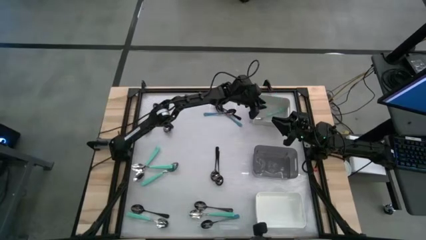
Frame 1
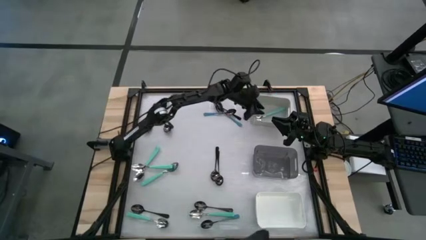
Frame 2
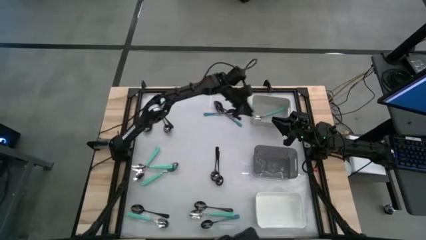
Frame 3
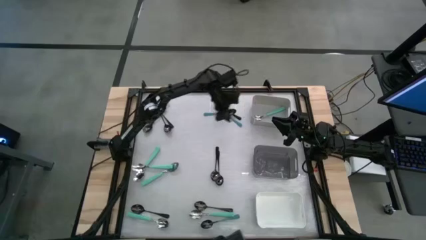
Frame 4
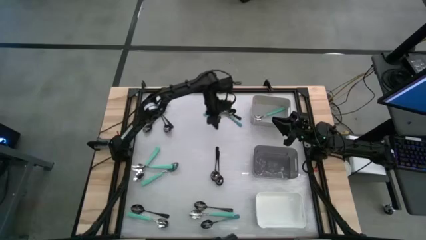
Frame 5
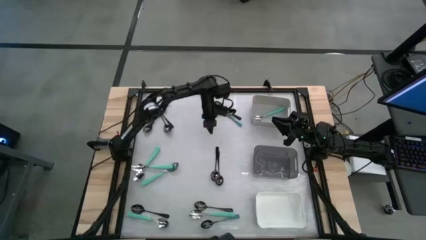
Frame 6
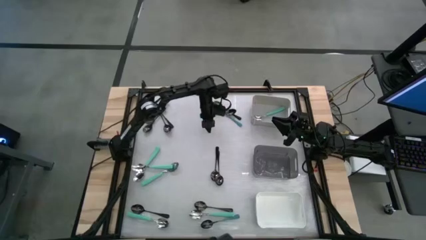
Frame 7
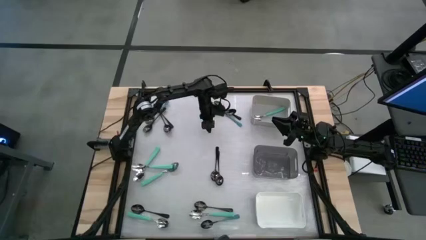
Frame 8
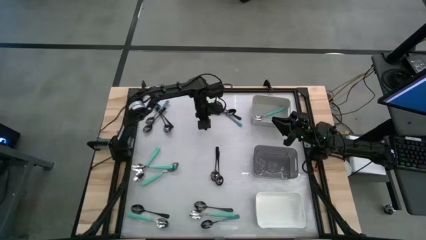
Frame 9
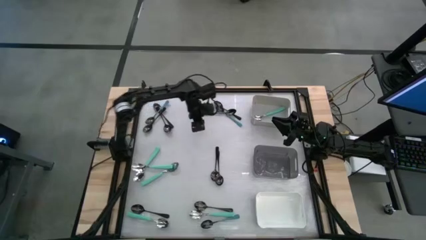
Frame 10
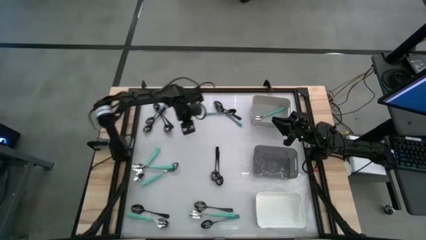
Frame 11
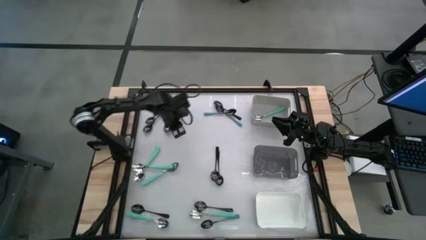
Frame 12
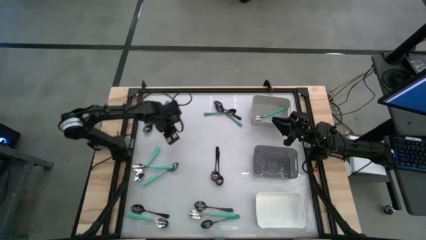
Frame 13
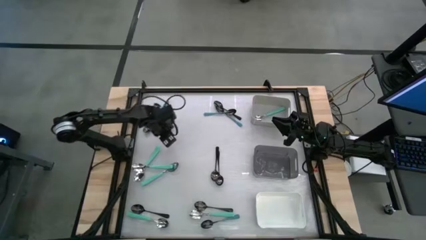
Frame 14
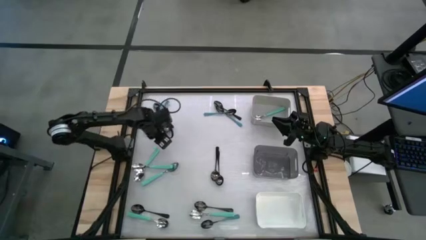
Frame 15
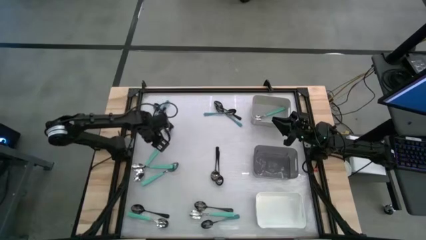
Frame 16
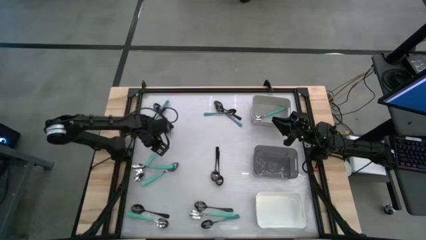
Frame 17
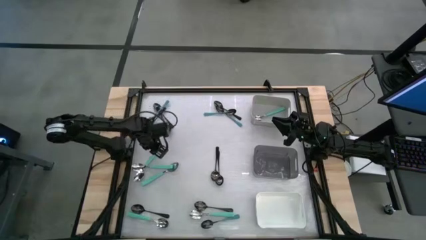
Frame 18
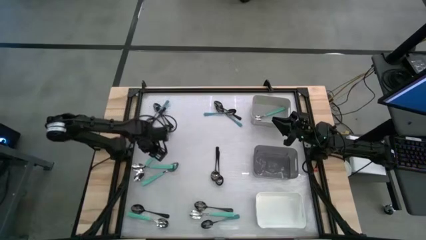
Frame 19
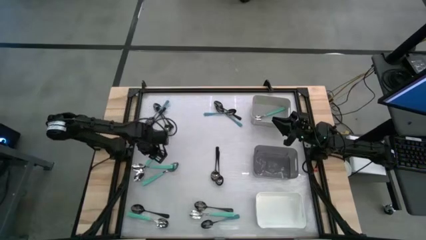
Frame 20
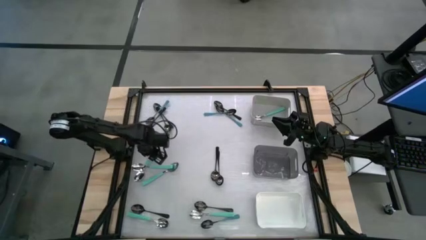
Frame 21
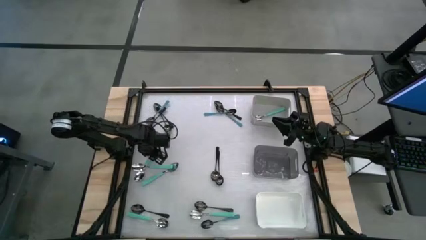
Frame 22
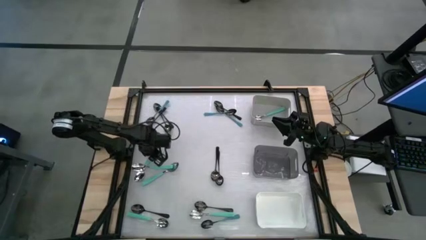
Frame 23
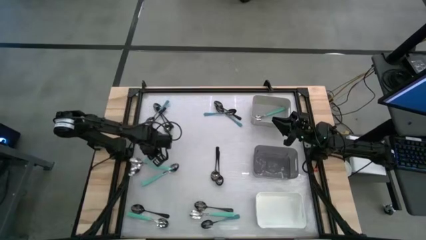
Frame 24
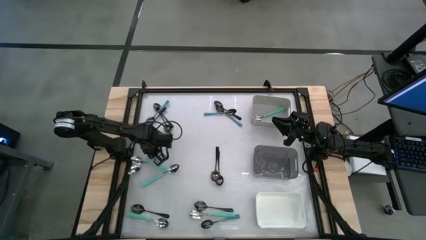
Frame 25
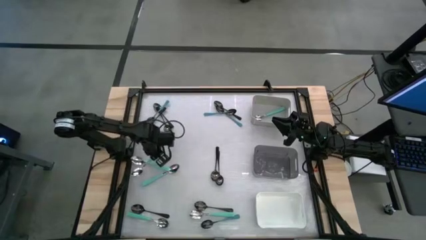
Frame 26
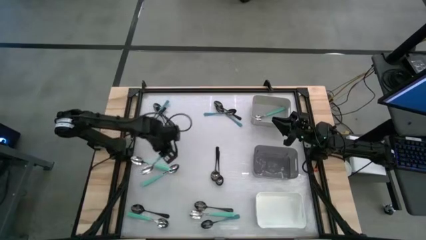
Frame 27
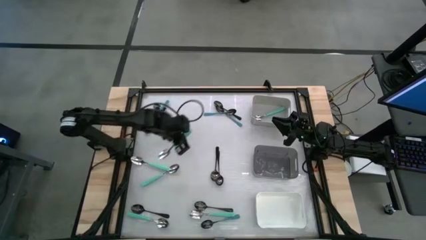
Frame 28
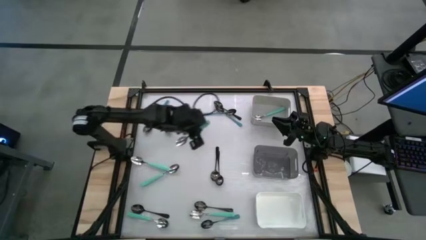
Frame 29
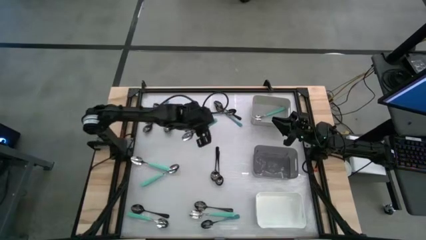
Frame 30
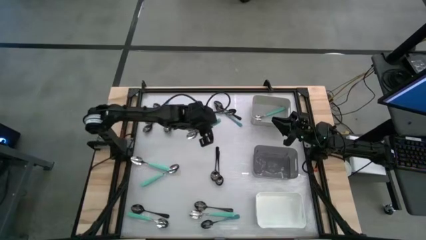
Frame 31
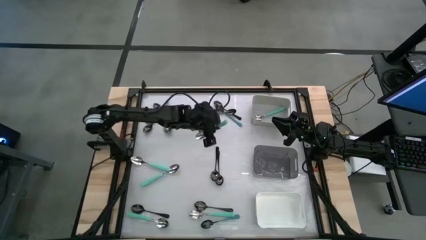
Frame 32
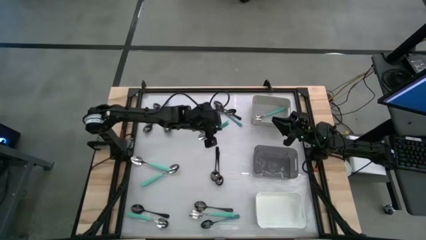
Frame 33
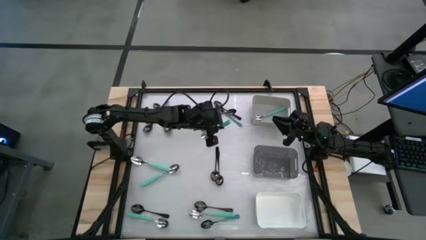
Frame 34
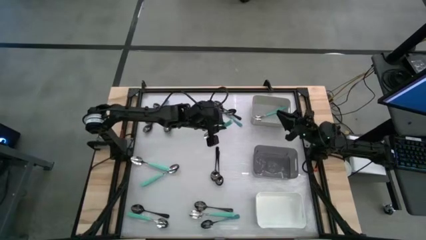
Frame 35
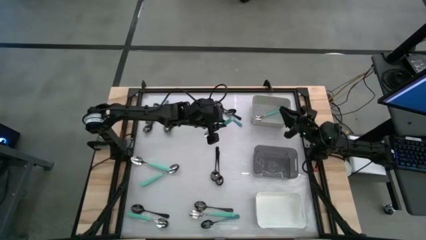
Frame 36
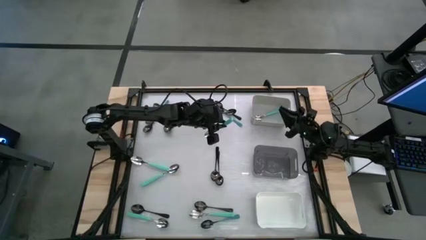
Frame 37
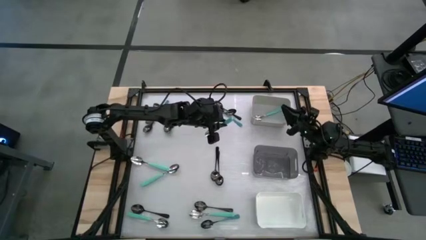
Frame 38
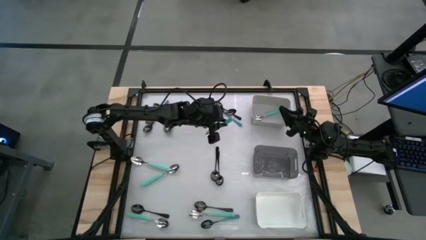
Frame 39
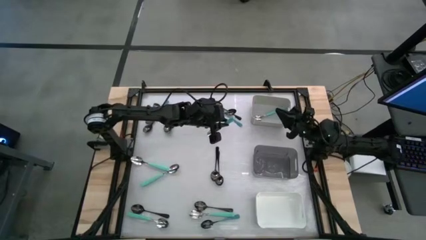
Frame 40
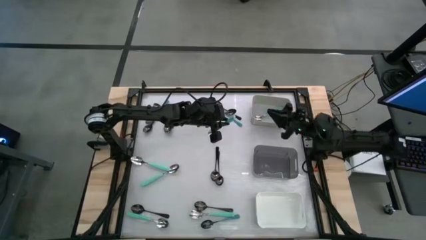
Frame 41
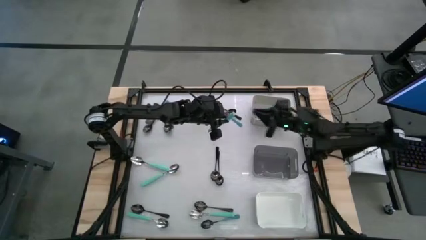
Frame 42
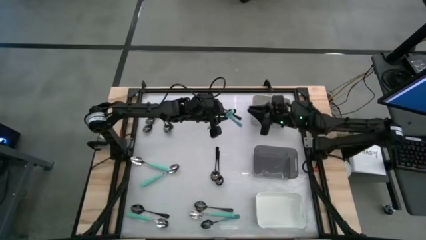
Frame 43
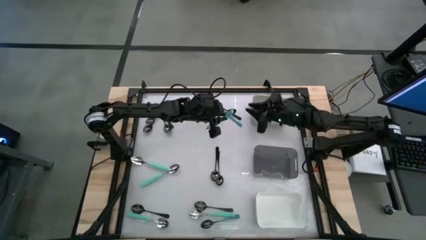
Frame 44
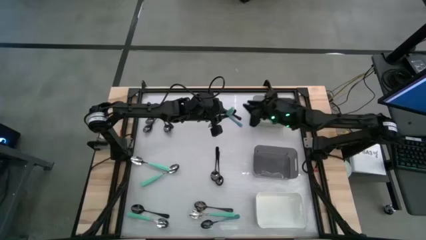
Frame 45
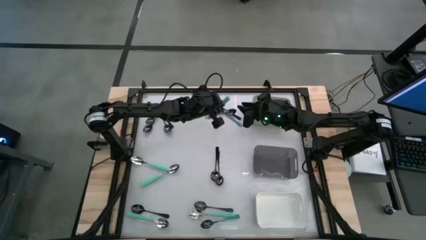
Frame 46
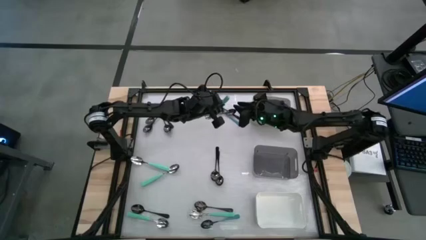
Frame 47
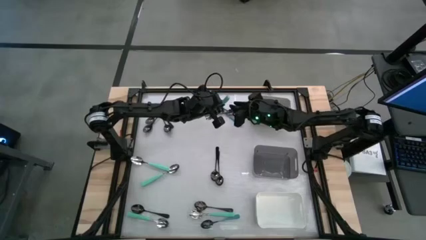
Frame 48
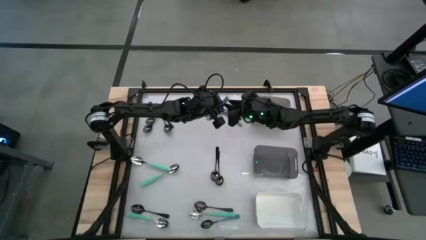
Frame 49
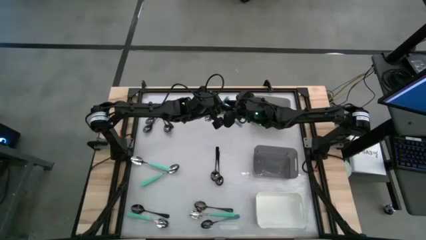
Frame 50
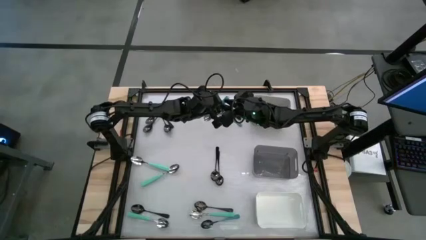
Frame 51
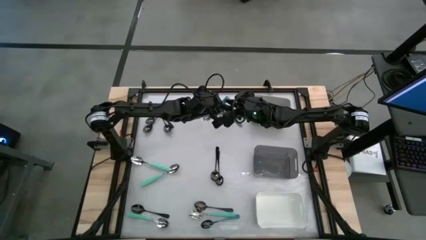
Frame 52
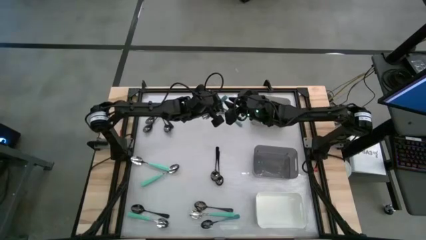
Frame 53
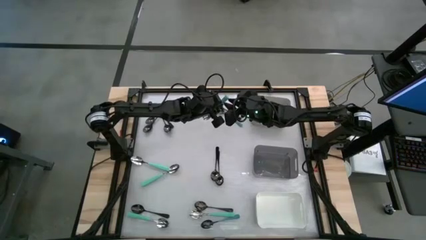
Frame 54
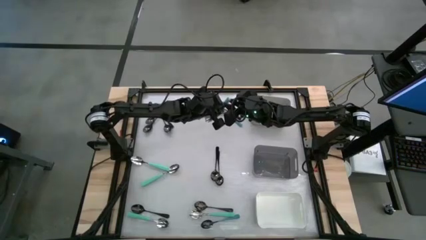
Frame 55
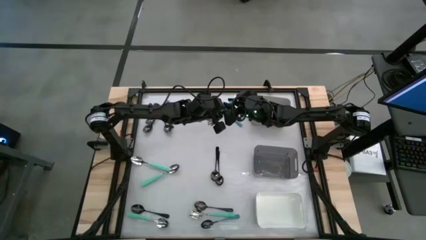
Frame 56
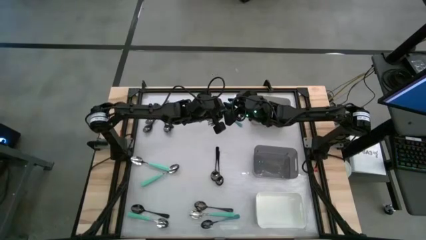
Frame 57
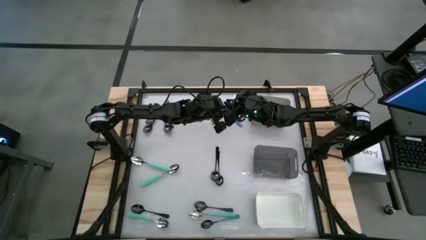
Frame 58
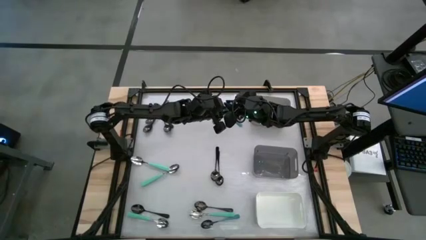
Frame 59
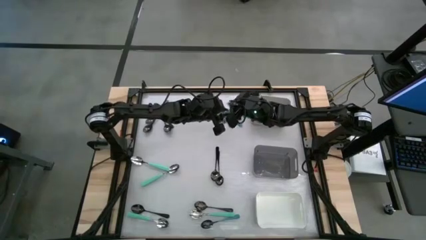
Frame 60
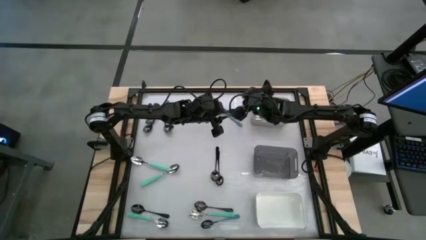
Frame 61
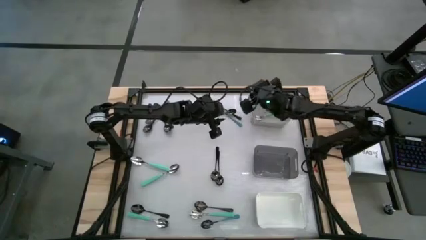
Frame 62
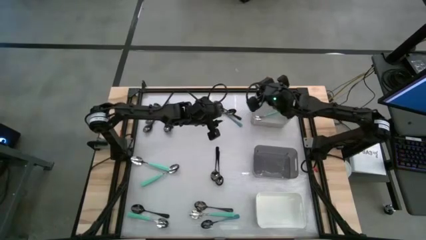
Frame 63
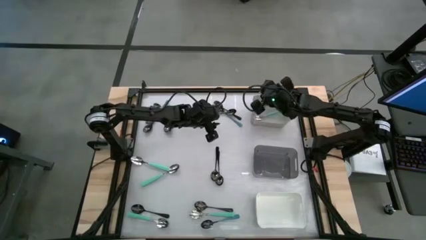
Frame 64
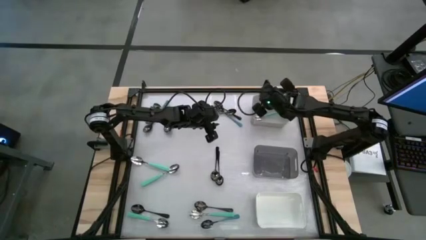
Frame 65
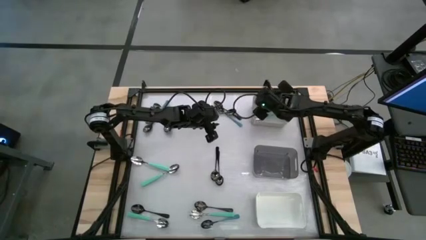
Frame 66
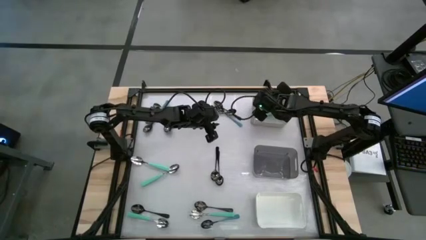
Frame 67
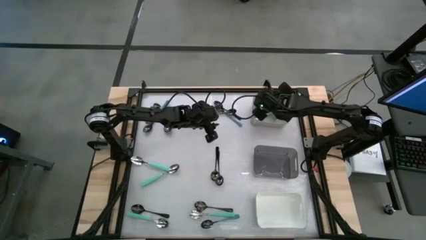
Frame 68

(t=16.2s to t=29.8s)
Task: Sort silverware by color (type)
Put the light blue spoon into the gray bin

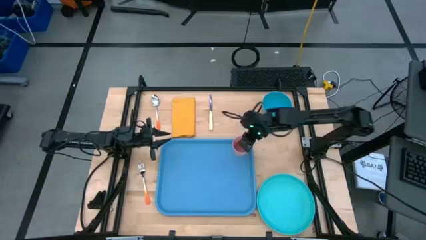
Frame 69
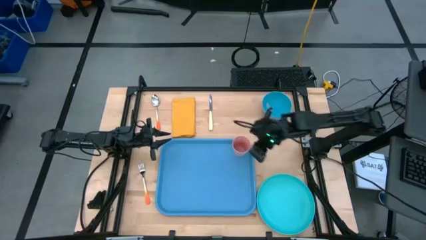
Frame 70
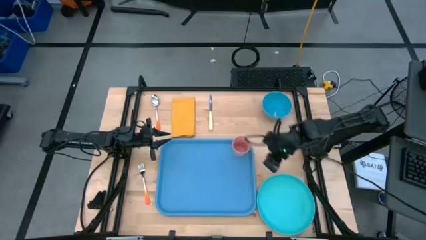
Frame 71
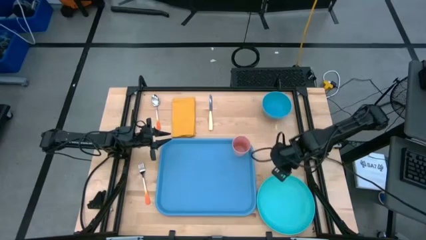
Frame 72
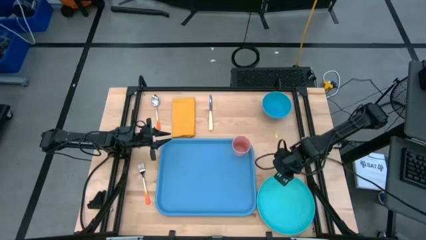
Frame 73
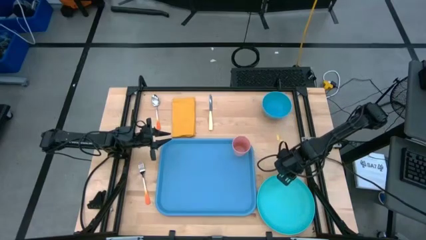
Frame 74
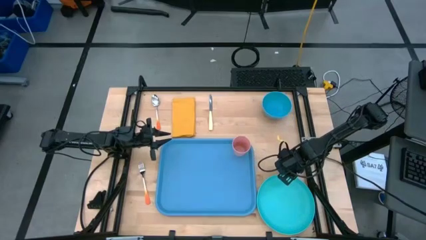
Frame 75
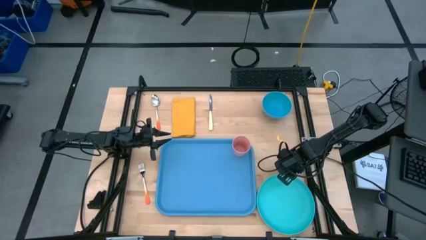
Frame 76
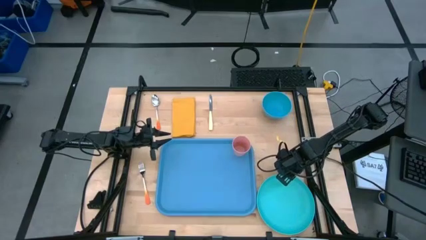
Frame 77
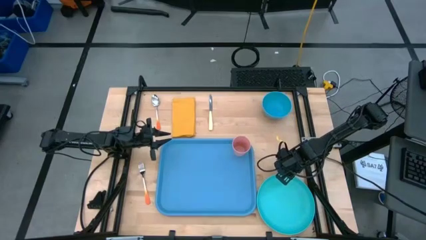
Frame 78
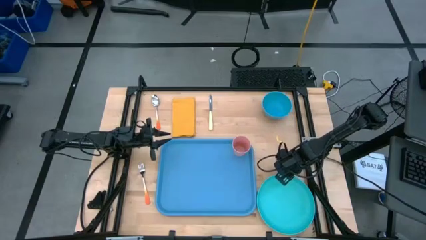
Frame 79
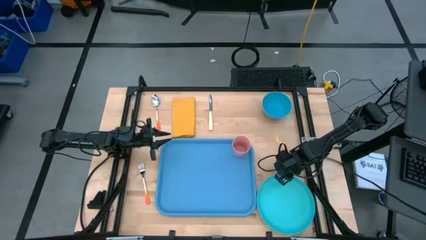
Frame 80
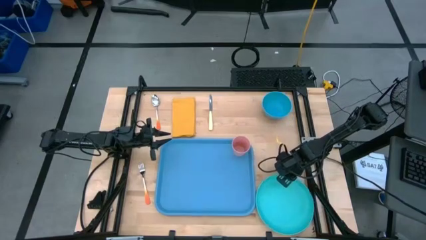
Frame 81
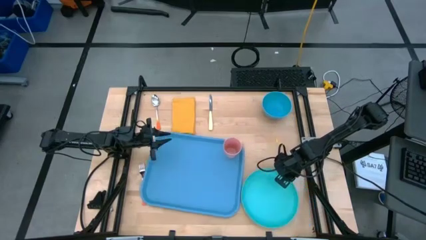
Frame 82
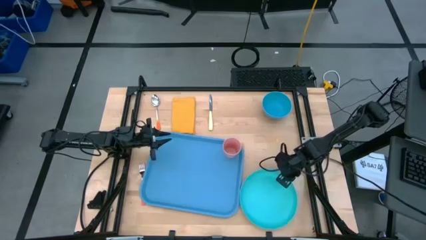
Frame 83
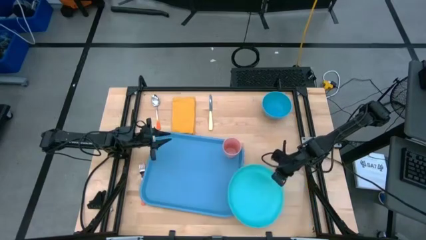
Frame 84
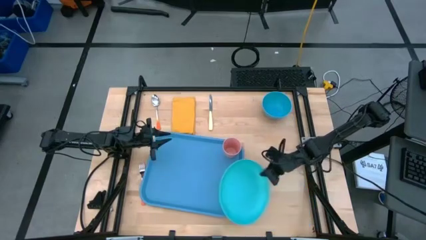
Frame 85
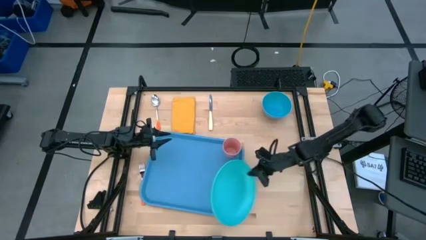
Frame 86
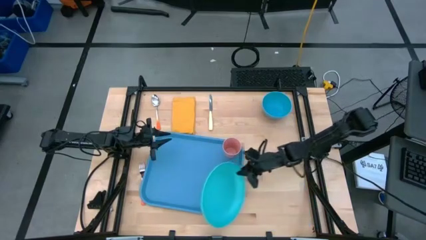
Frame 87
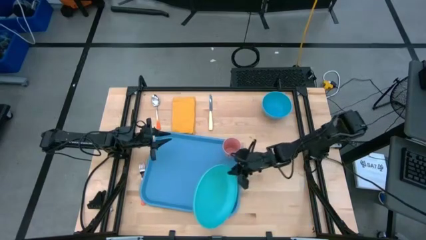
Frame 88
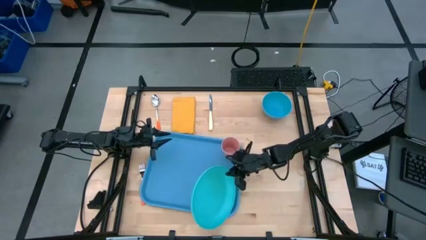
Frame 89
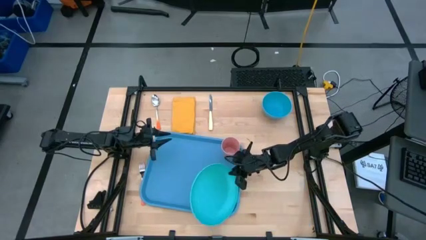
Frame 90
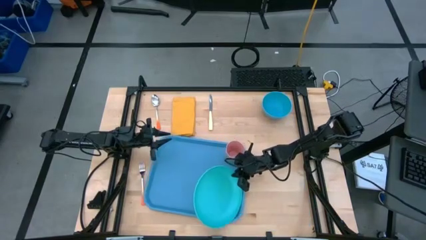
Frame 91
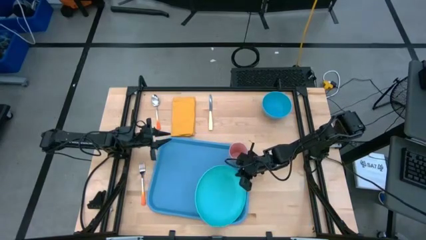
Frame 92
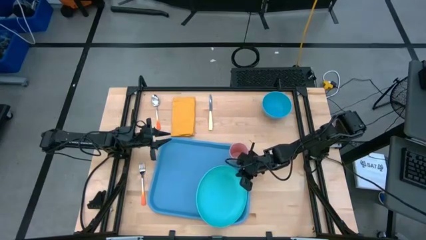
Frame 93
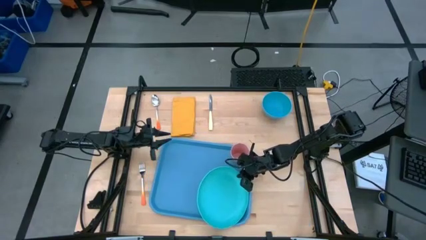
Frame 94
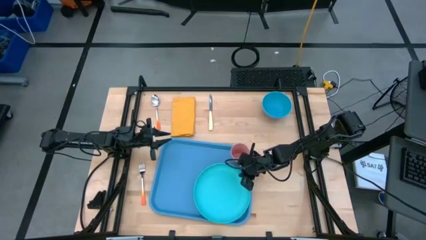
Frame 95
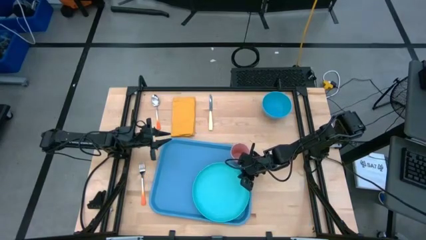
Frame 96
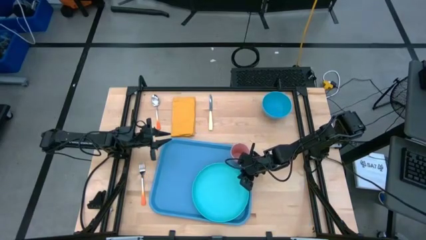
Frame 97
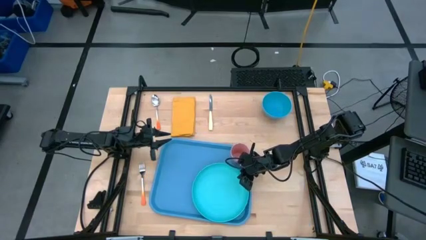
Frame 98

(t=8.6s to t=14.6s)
Task: Set up tray
Put the blue plate on the blue serving tray below the pink cup
